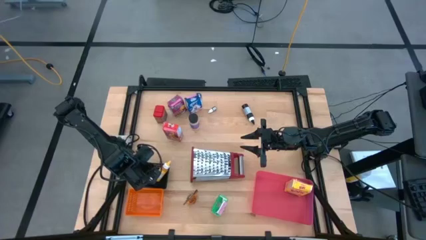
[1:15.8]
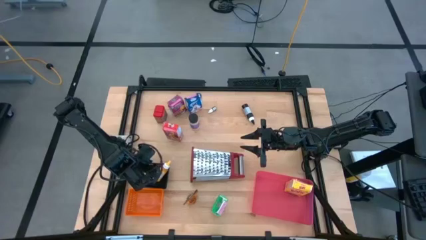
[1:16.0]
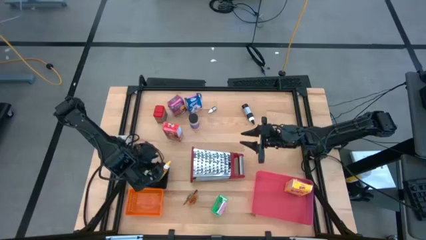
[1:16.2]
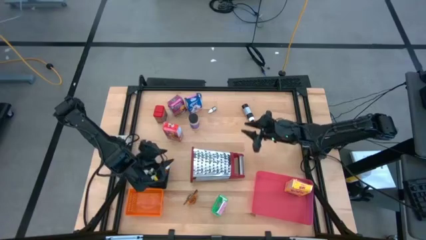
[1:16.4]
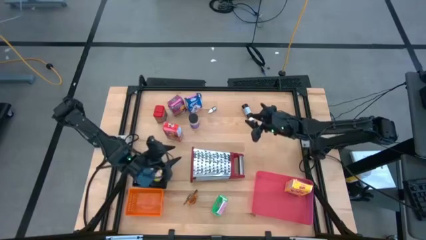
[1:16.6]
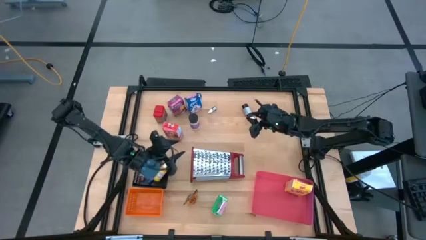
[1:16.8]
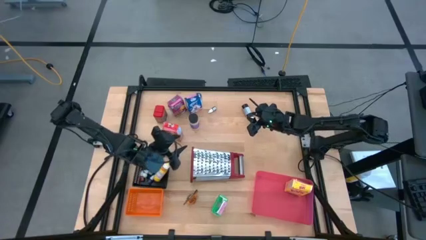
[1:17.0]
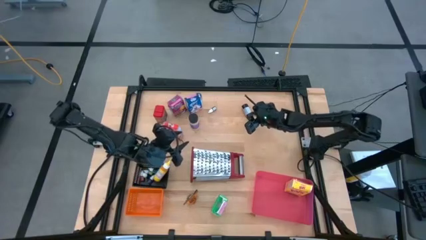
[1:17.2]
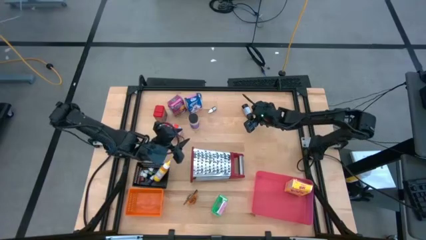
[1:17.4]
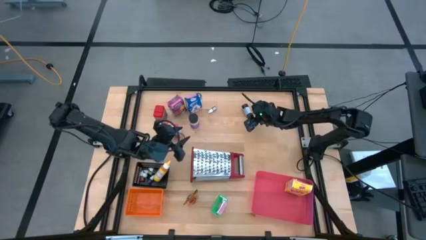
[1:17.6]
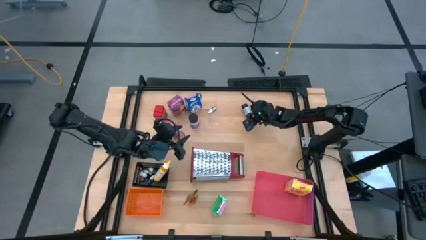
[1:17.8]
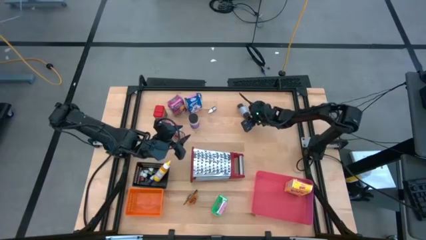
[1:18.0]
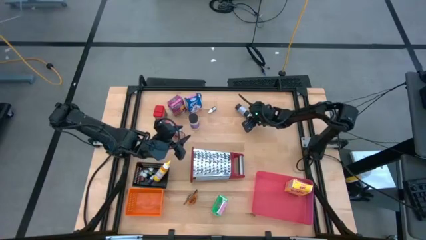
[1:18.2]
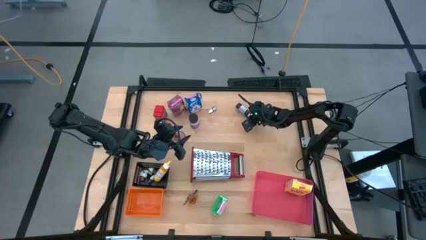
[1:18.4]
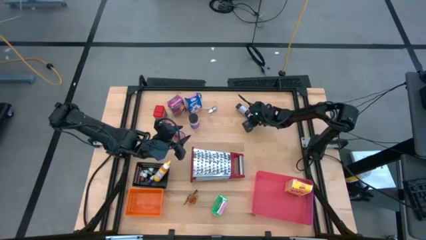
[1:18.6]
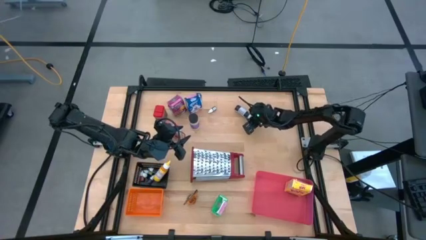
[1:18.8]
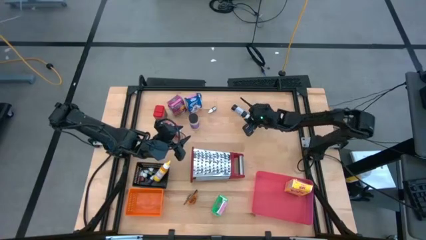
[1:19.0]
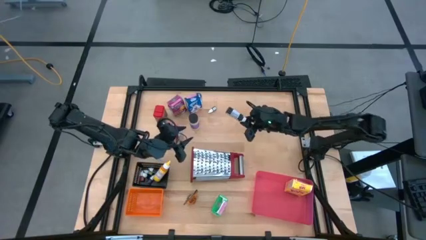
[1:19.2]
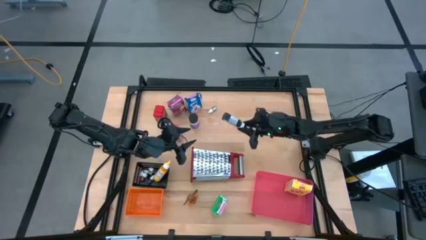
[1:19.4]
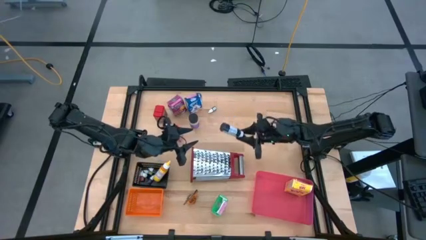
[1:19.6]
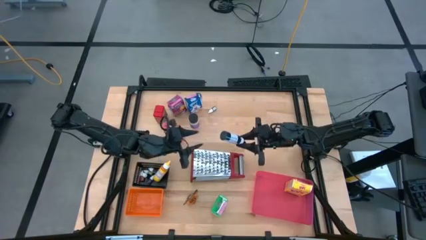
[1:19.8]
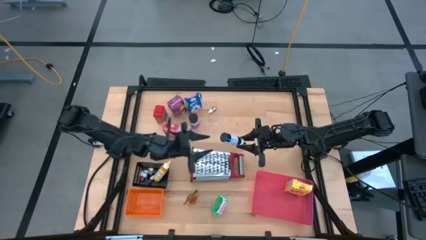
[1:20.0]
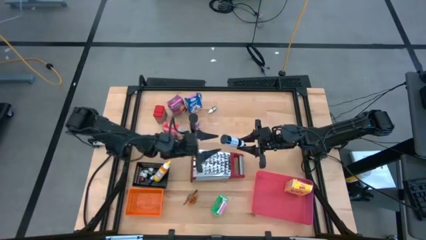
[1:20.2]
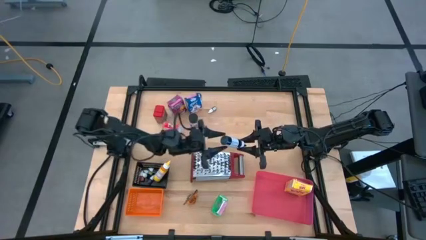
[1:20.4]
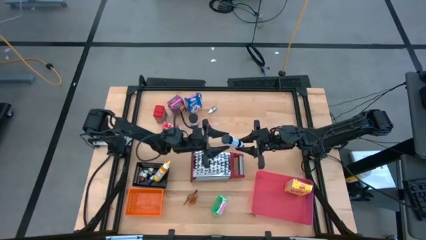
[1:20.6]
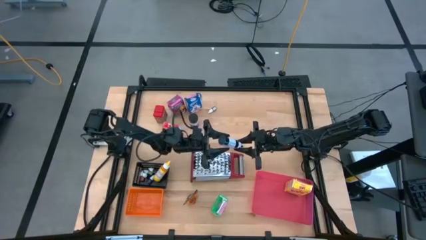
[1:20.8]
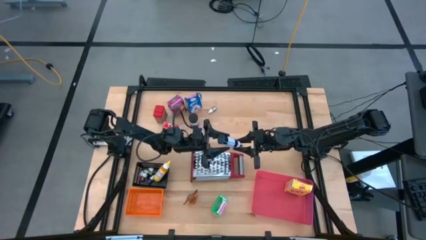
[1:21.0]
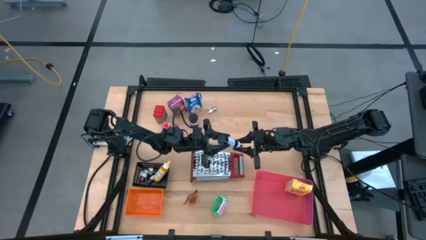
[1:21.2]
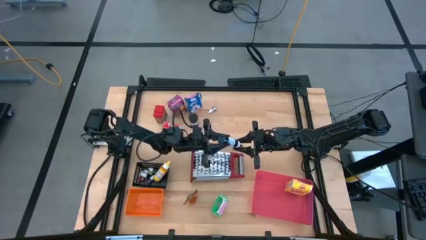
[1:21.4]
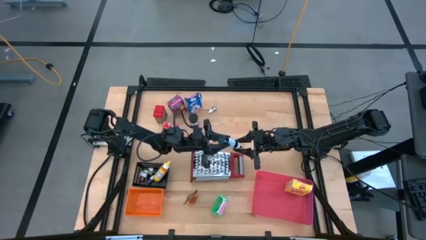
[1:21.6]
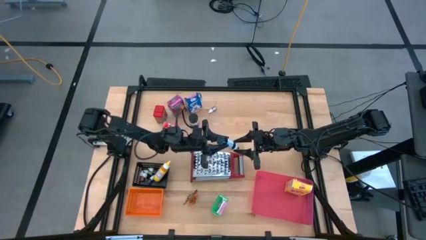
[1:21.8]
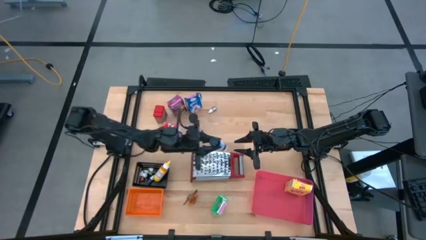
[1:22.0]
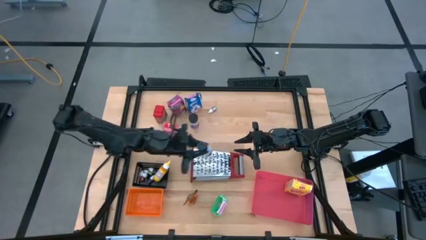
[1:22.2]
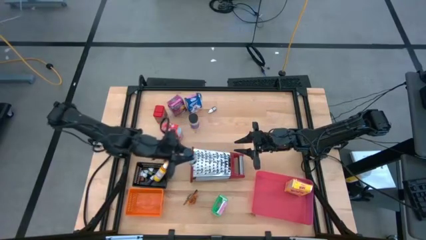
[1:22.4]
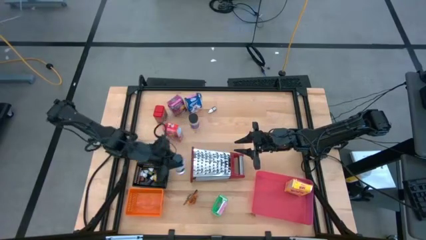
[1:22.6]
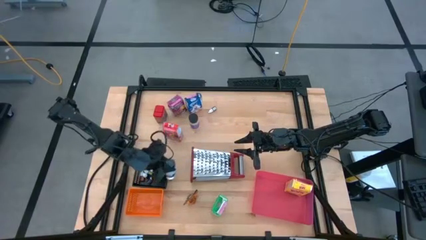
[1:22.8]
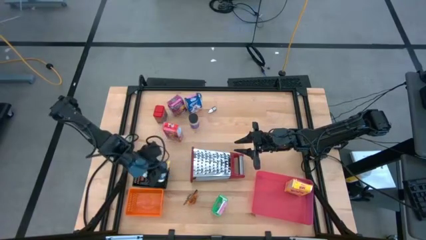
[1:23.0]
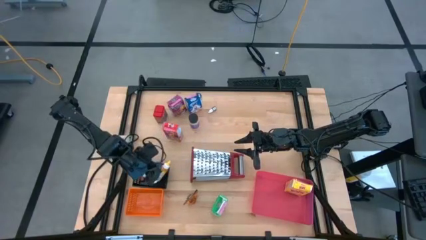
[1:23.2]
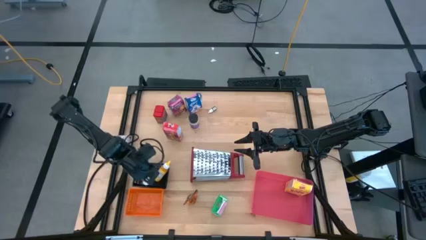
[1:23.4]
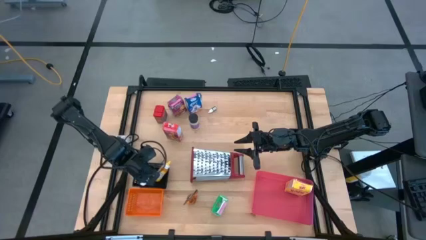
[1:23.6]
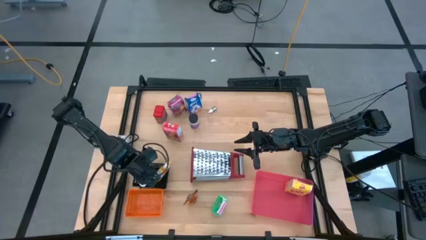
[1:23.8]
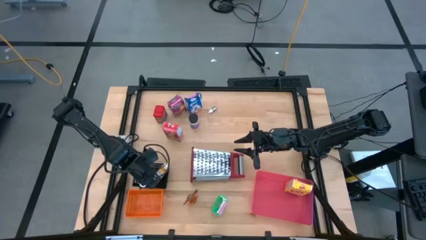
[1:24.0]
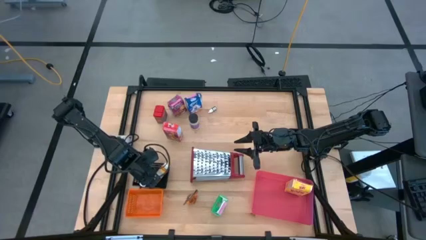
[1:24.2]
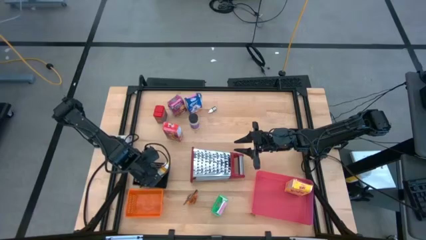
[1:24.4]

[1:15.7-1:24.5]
Task: Pick & Place Kitchen Items
Put the large black food coloring bottle into the black bin

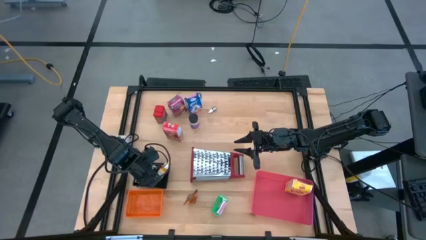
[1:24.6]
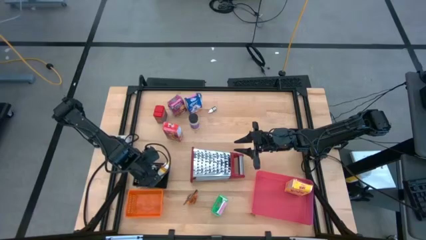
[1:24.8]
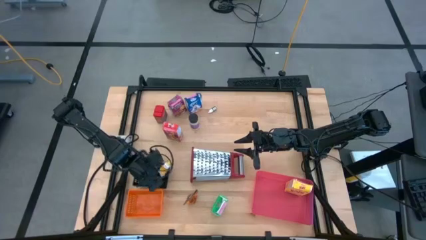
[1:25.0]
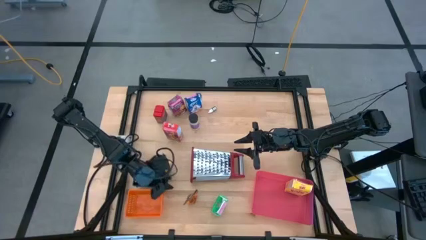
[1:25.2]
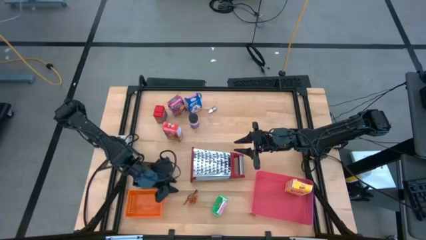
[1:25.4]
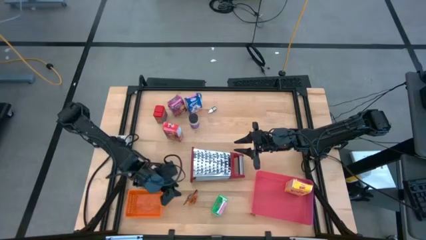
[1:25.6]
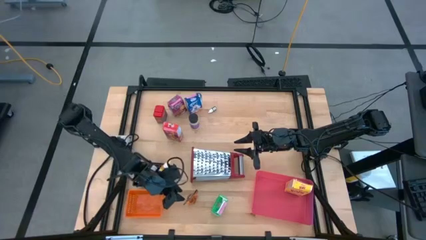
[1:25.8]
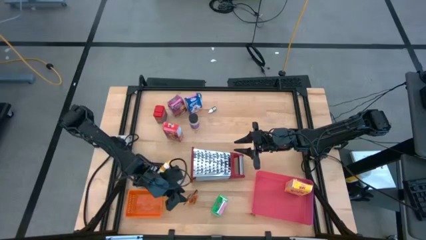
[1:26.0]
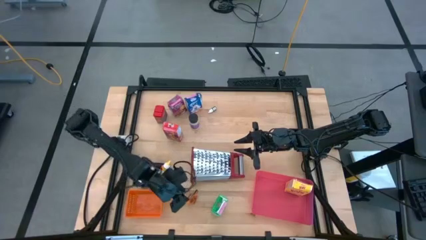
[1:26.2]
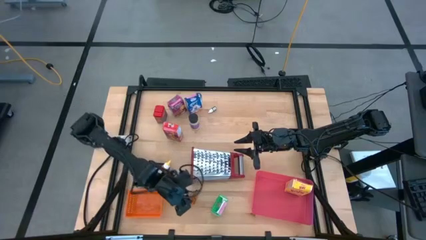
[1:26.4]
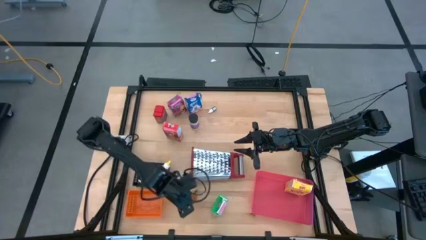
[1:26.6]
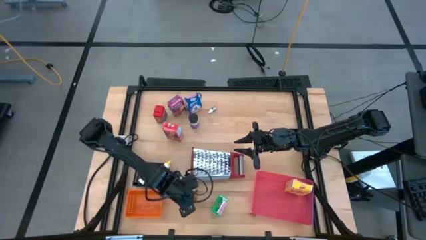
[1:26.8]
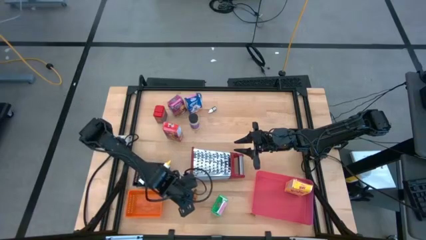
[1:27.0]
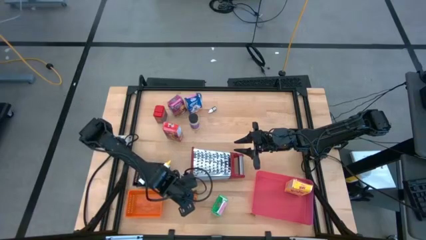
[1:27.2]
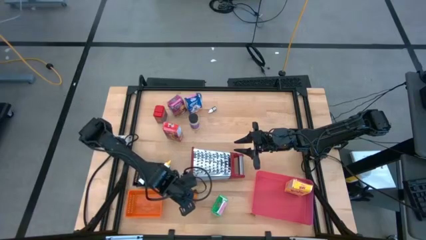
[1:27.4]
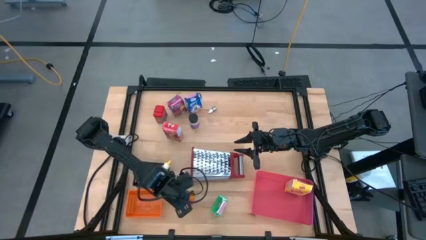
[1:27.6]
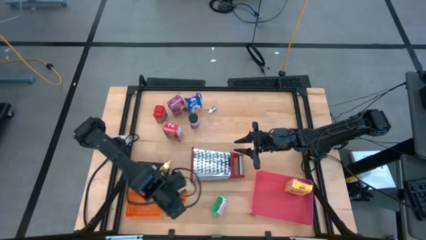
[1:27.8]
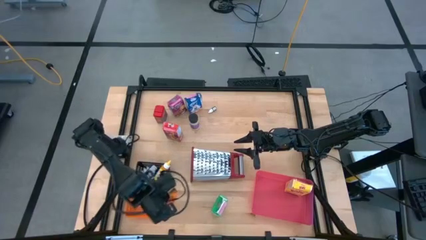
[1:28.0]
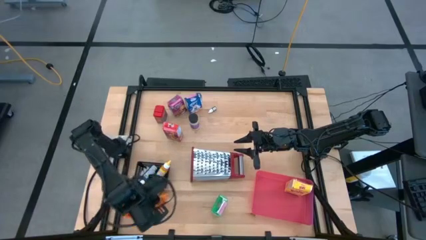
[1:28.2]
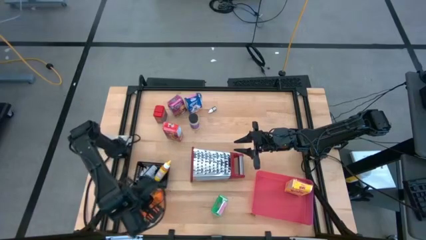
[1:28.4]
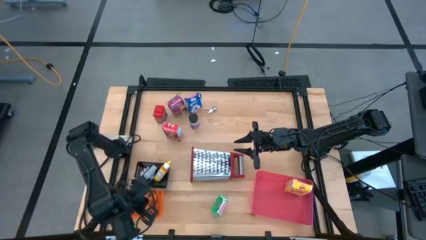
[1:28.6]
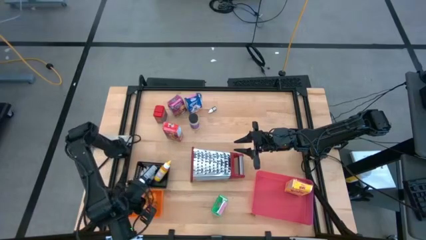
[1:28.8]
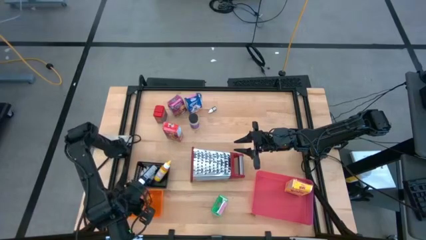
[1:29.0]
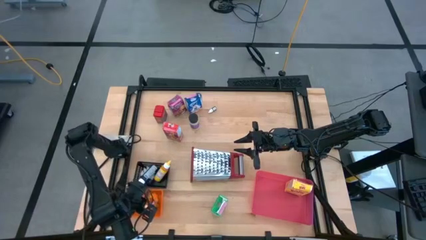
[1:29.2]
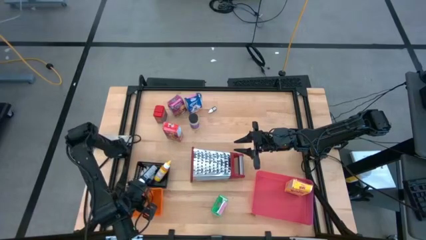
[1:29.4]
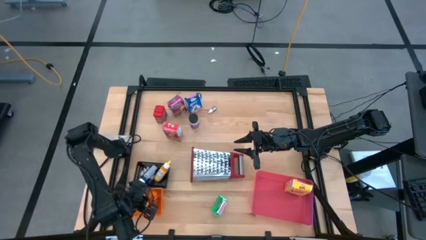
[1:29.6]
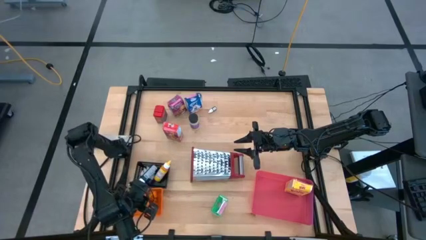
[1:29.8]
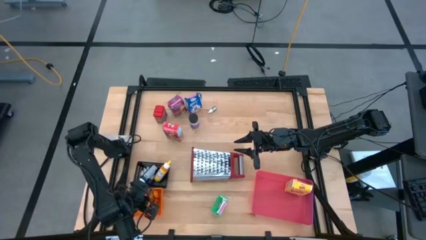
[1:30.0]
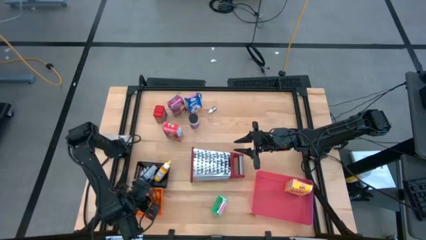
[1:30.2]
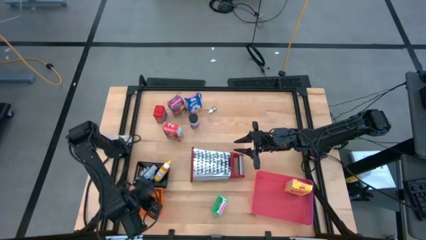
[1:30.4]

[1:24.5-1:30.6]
Put the orange seasoning pack into the orange bin

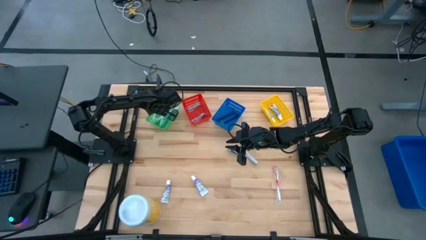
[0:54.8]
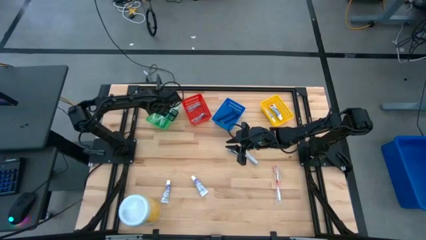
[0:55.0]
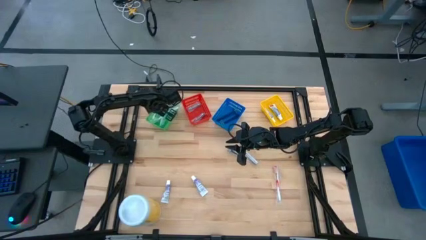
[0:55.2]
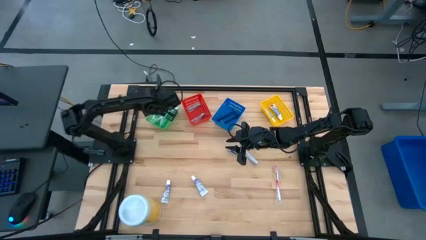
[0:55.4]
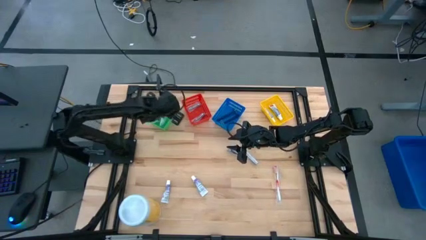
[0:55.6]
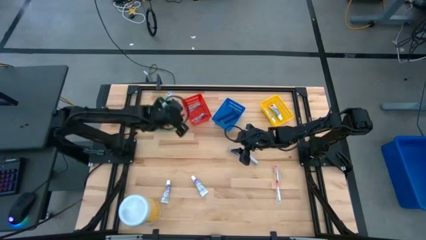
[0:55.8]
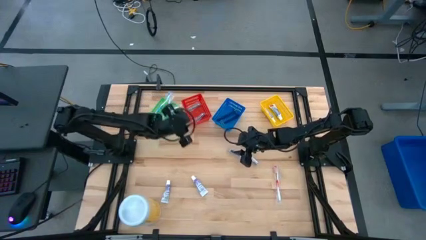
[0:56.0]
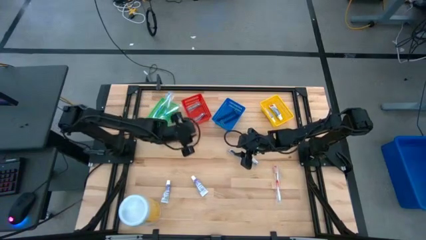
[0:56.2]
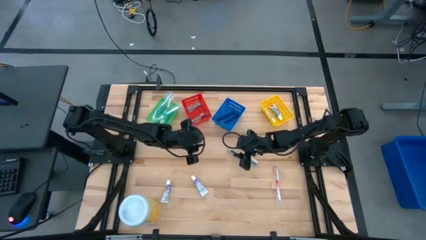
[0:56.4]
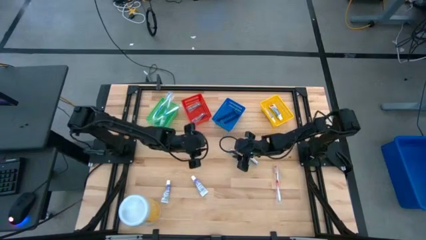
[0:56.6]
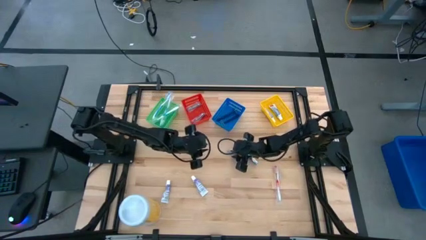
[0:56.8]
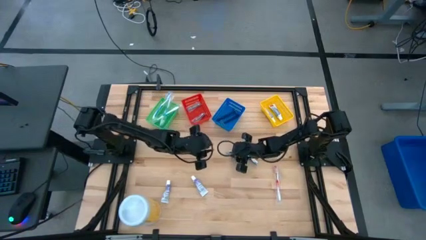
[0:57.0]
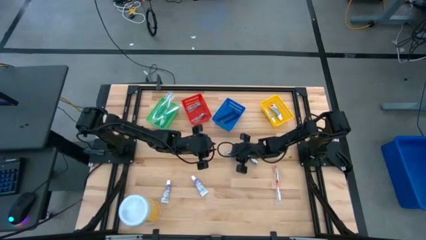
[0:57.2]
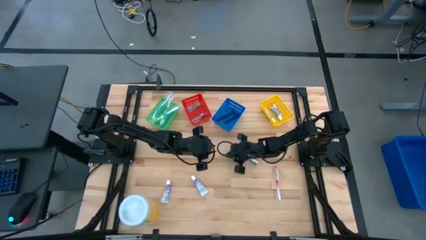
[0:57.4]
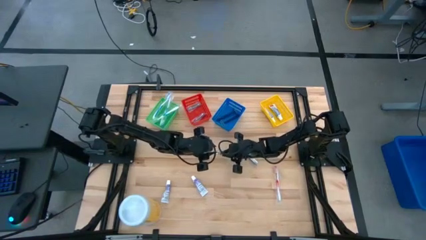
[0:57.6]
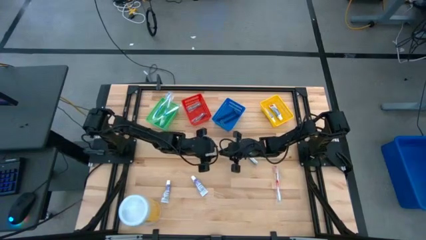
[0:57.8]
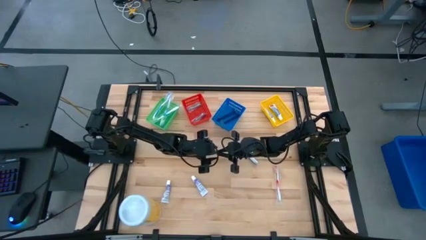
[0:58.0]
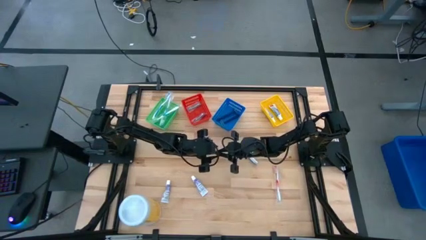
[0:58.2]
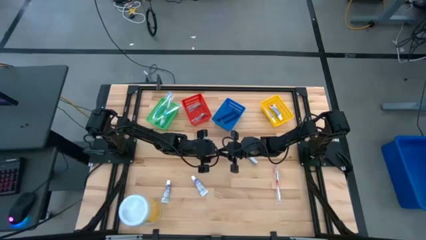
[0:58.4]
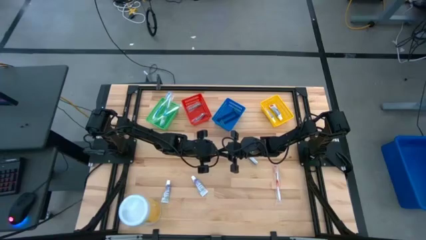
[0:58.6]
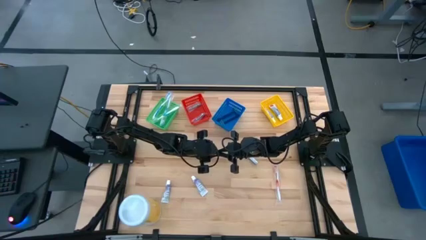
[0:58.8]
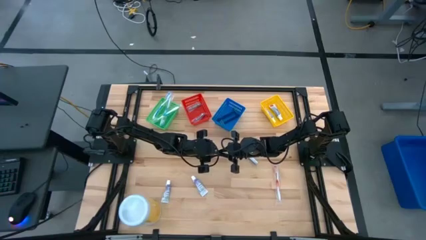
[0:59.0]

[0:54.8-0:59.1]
Task: Pick & Place Travel size toiletries
Put the left nail cutter into the red basket
